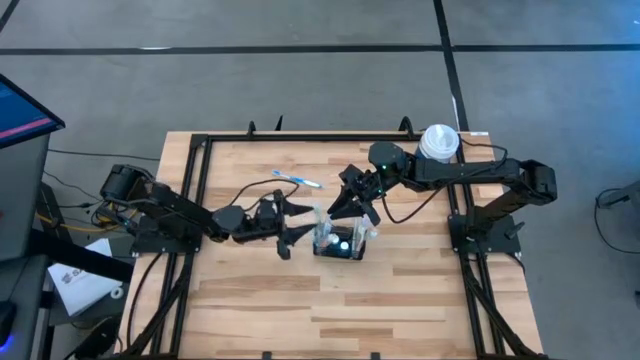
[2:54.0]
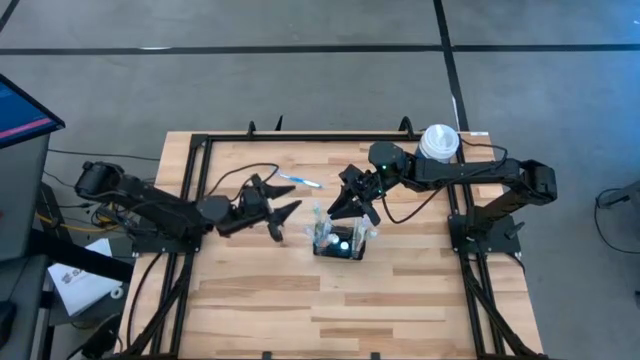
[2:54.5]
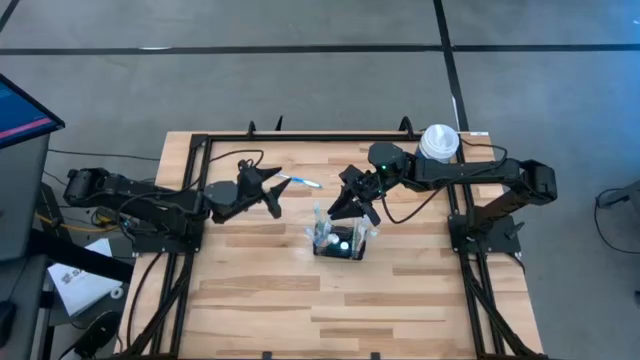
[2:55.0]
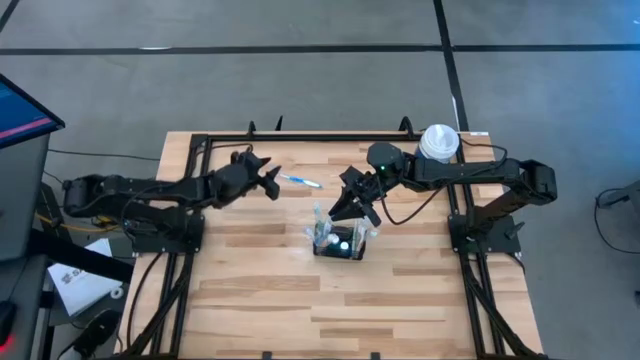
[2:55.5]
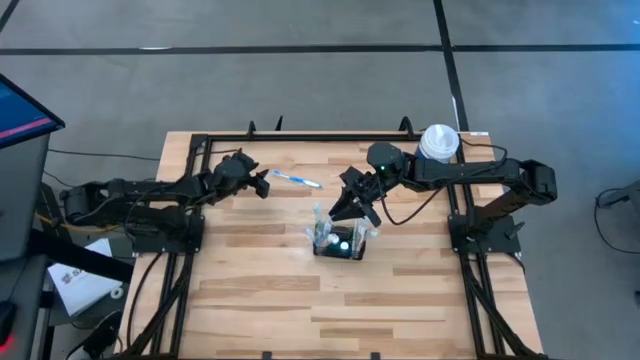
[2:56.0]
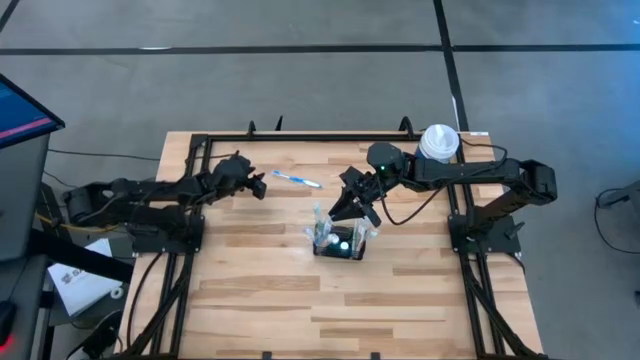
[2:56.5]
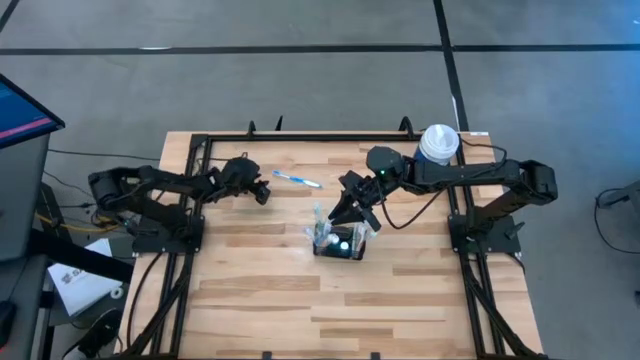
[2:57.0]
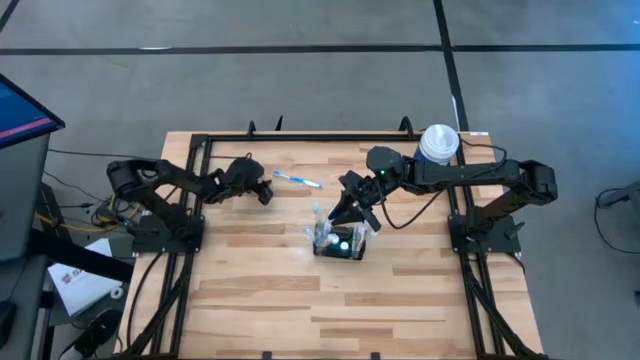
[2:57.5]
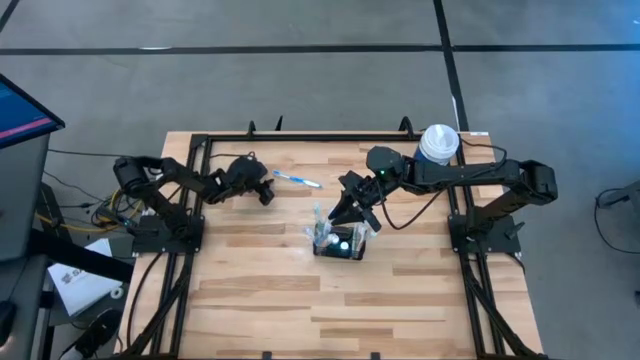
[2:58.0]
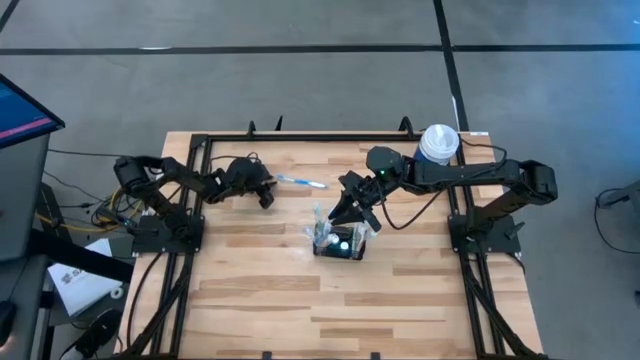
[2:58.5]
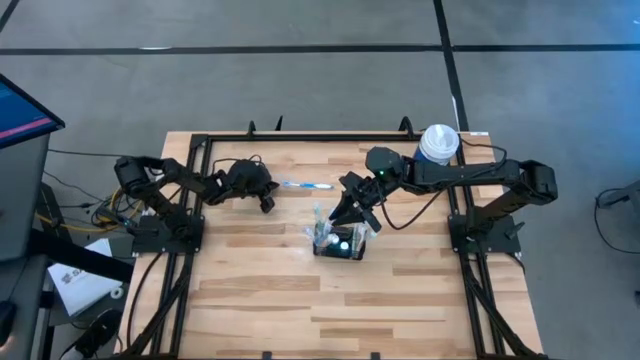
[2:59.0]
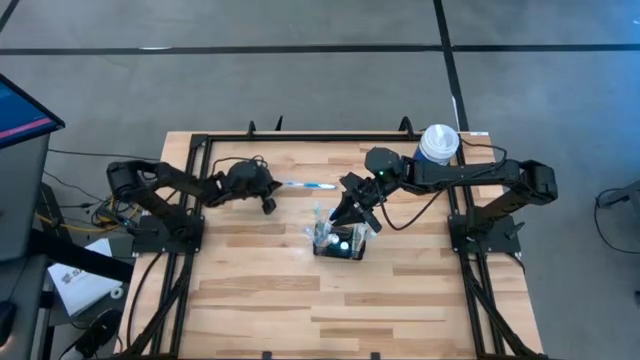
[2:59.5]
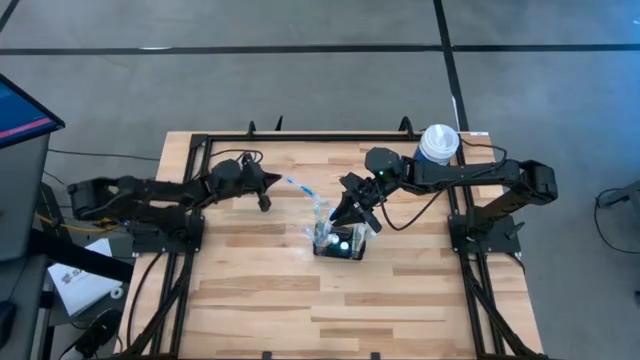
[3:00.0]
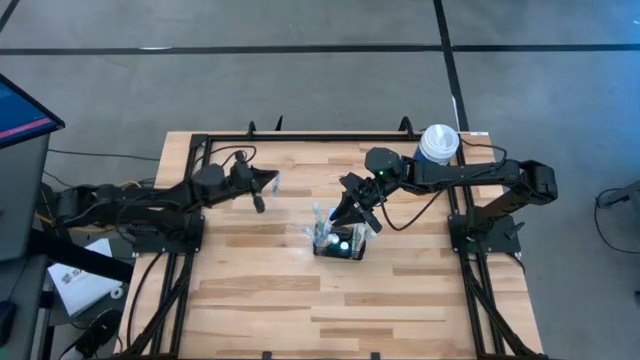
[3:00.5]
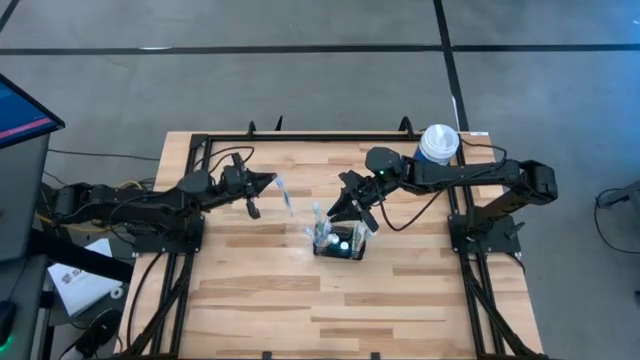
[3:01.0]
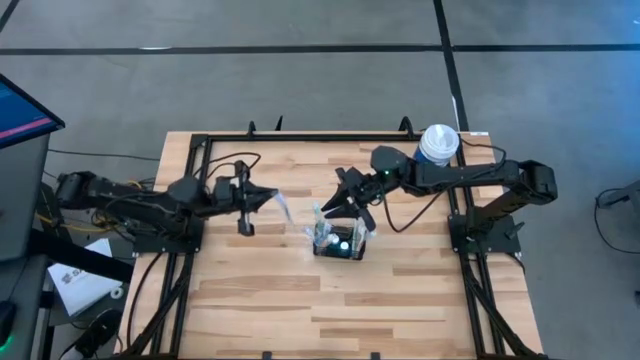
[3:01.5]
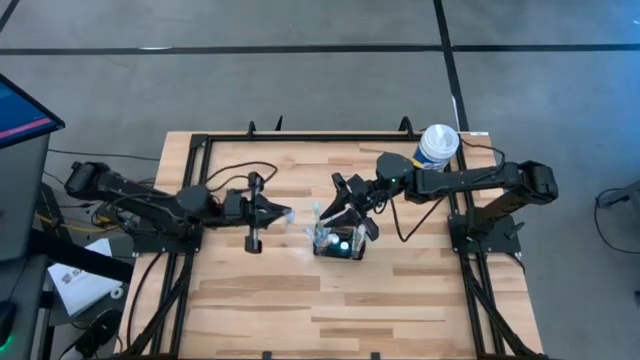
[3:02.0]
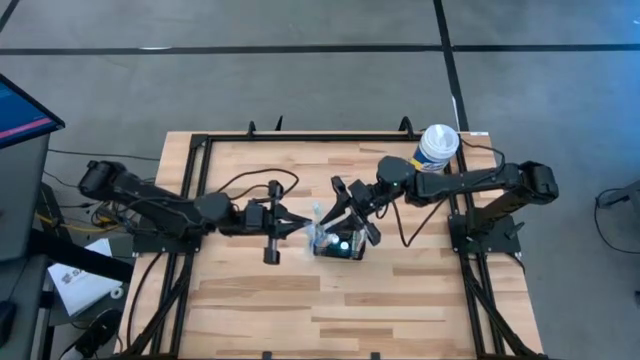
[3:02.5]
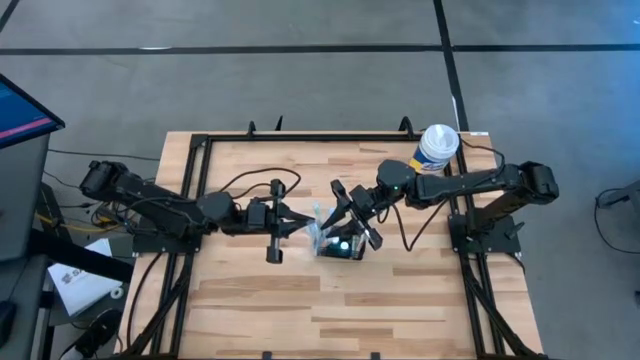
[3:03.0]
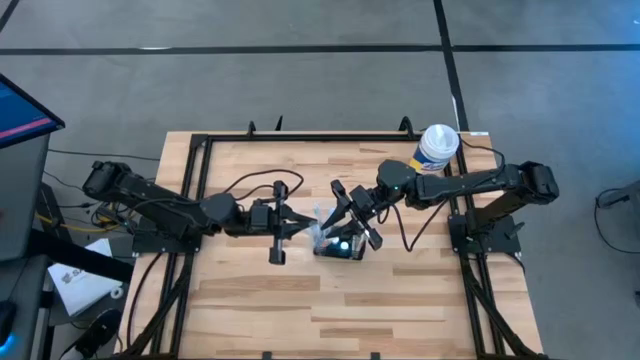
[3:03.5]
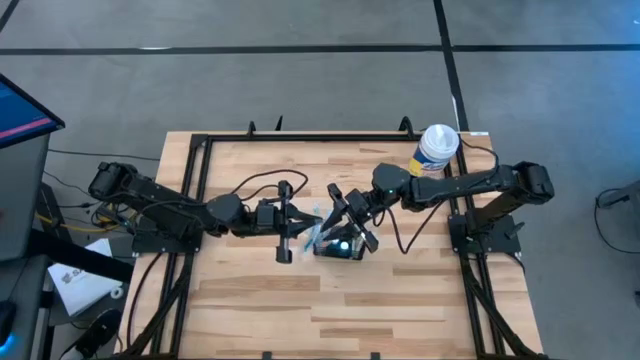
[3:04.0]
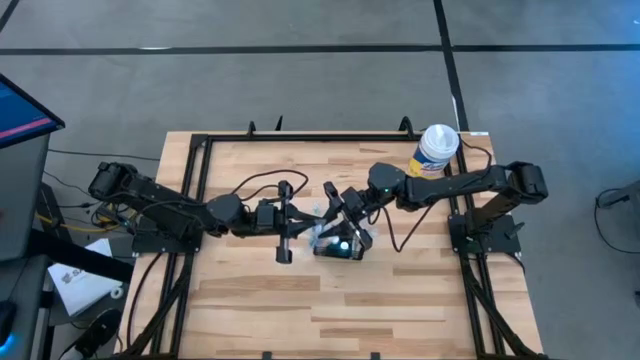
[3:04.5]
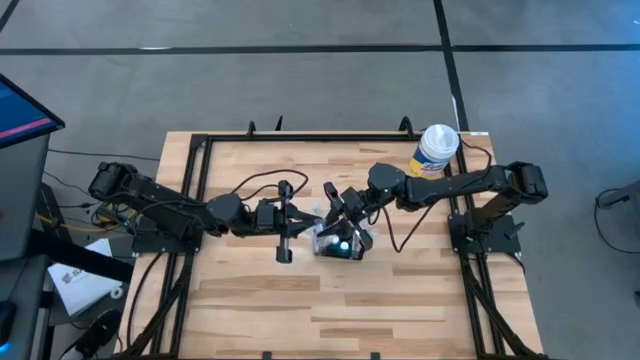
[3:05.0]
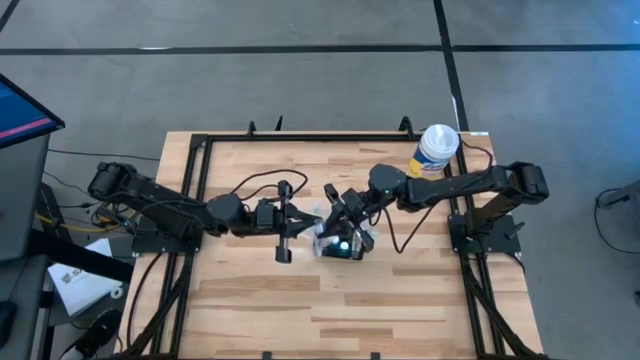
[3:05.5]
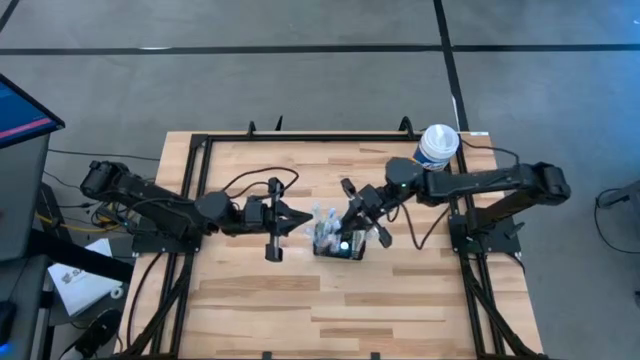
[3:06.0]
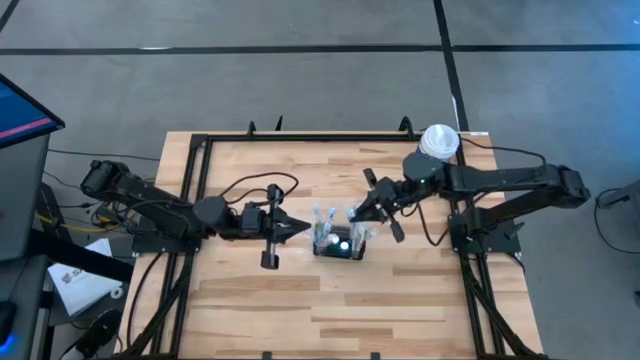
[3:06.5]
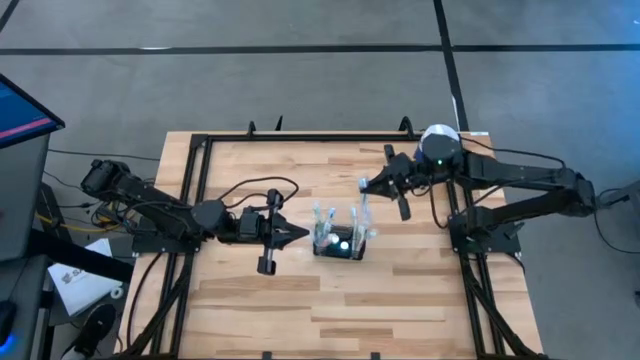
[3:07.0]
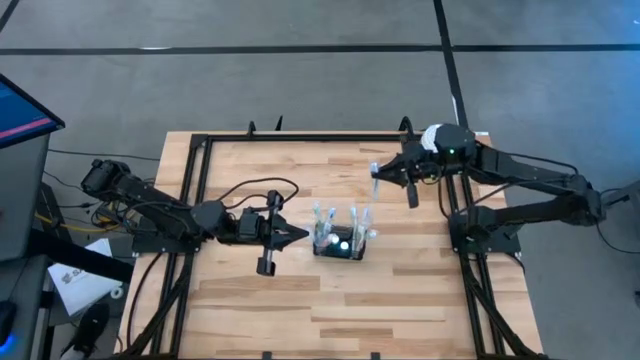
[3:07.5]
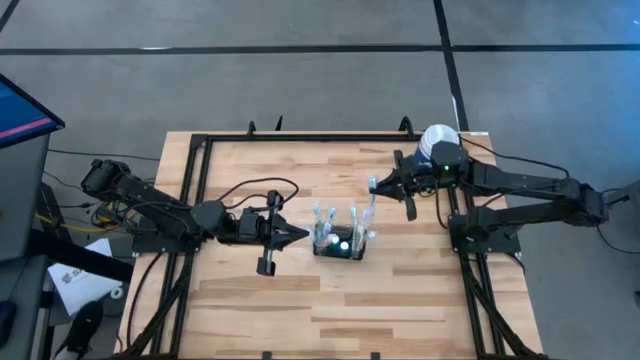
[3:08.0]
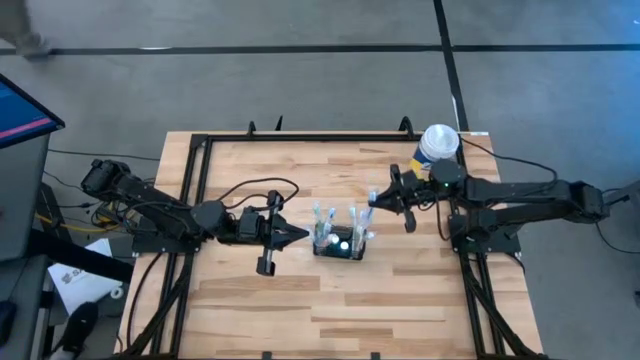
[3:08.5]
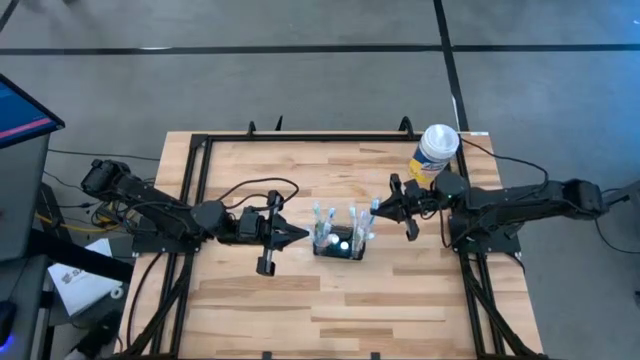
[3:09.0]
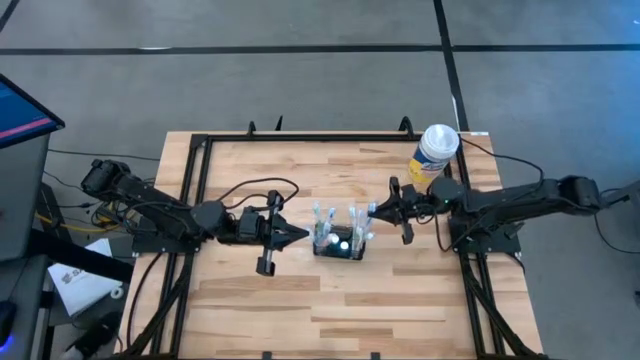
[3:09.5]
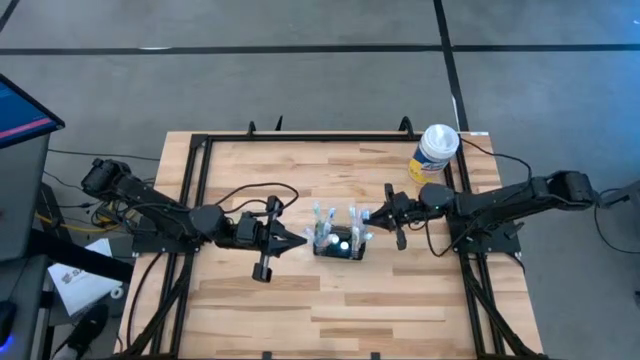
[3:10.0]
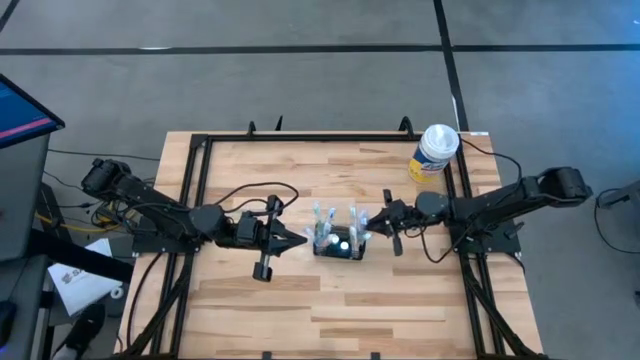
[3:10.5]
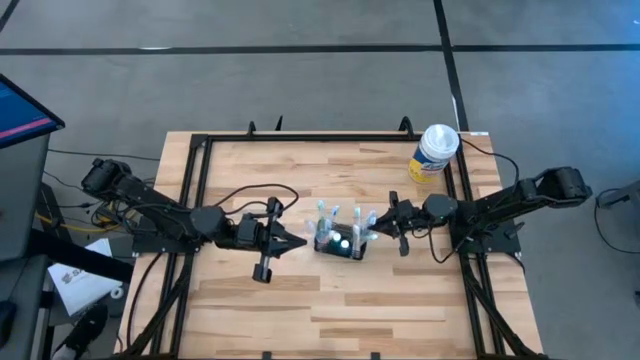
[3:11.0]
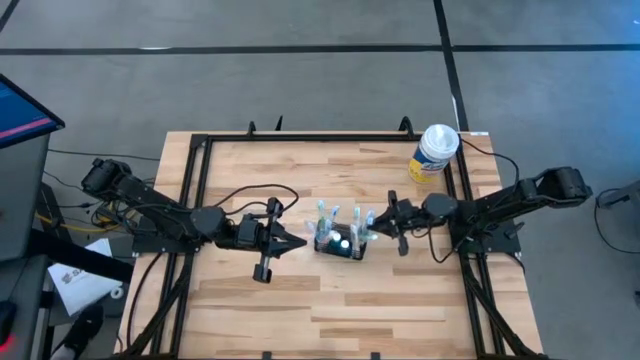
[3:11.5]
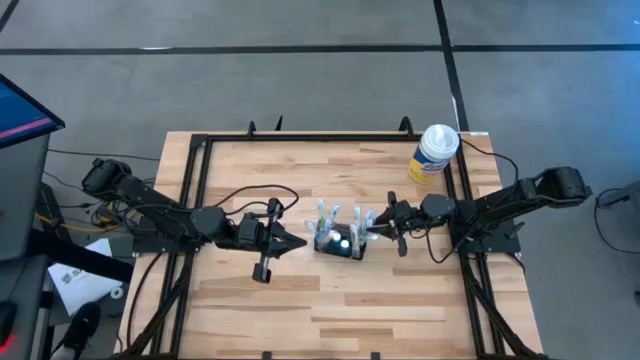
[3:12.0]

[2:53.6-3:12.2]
Task: Pick & Place toothbrushing station
Put the blue toothbrush into the wire organizer

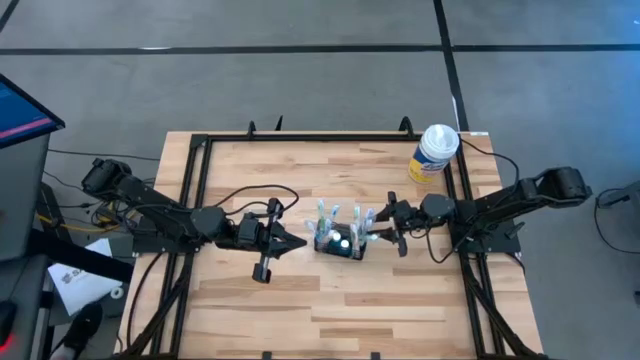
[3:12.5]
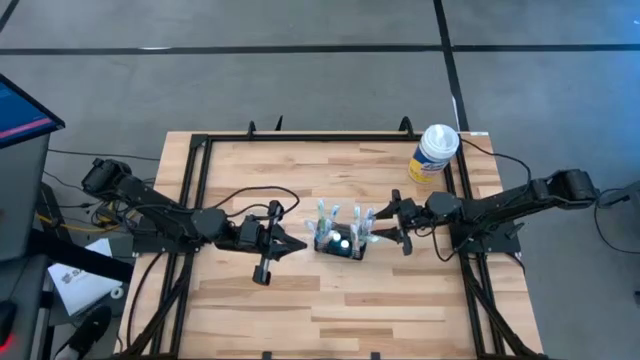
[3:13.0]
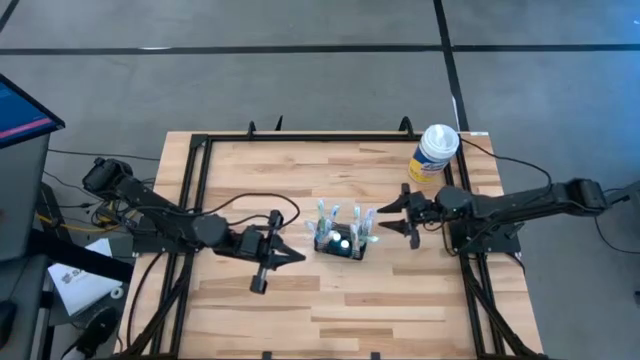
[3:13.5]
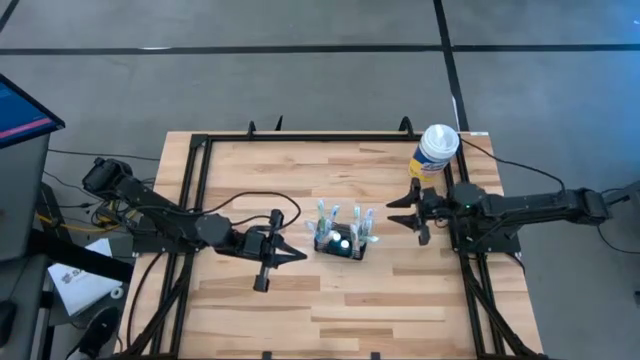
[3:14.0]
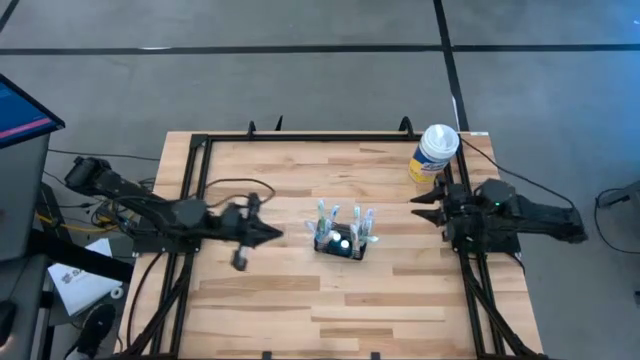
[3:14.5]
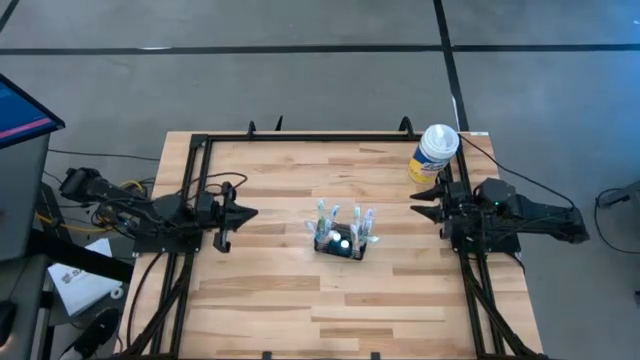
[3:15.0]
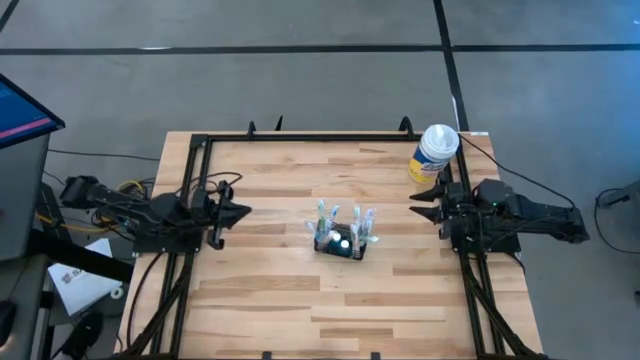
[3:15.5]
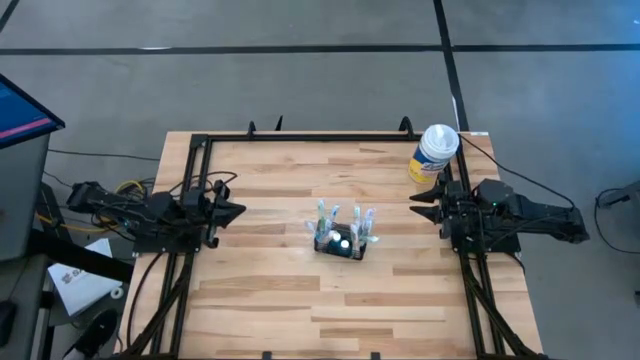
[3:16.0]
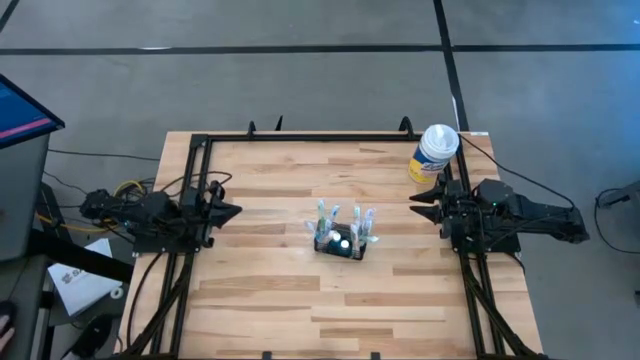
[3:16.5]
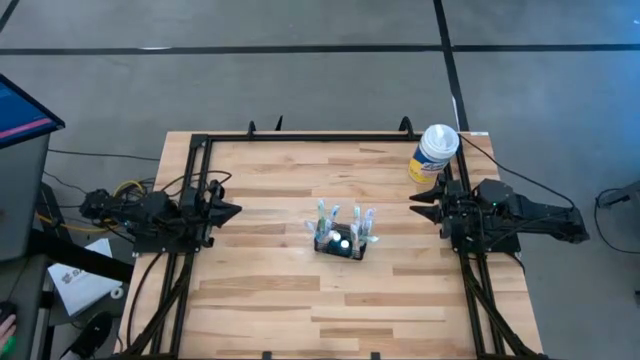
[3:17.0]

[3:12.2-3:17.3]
Return to Home Position
